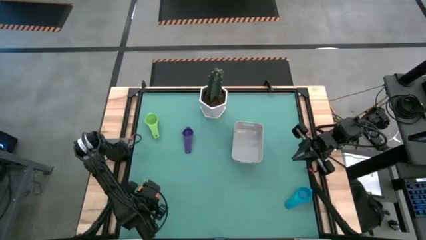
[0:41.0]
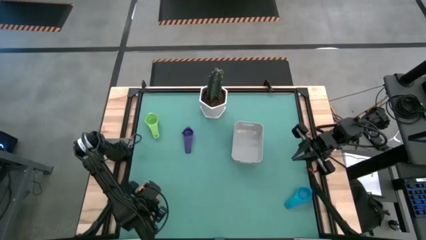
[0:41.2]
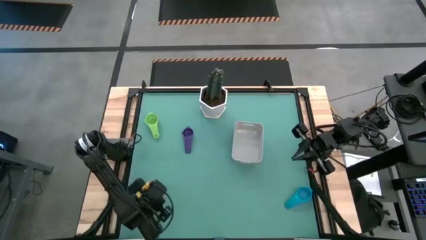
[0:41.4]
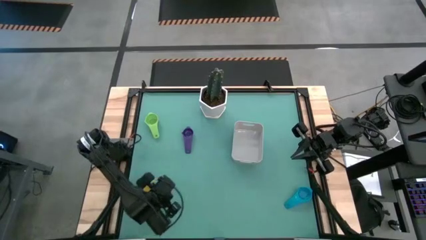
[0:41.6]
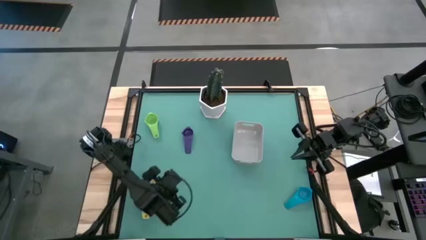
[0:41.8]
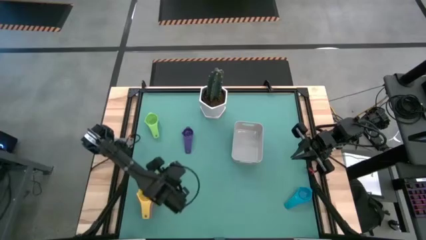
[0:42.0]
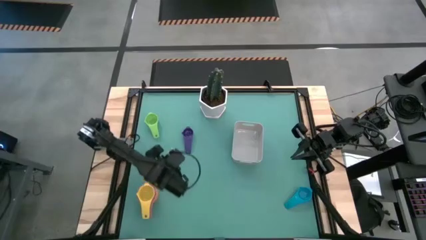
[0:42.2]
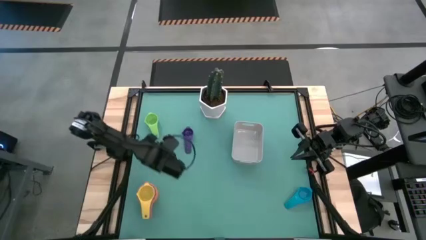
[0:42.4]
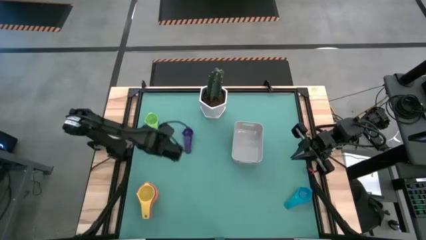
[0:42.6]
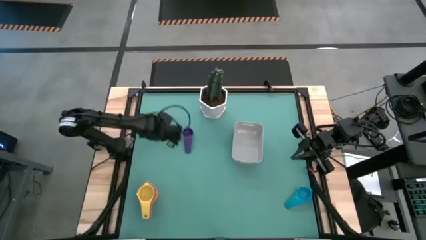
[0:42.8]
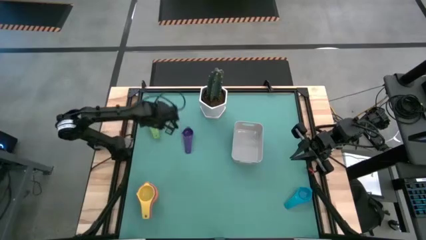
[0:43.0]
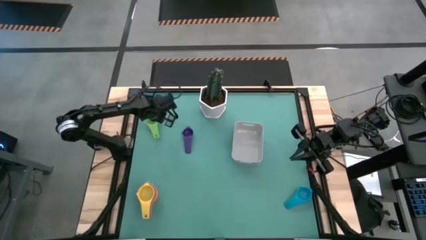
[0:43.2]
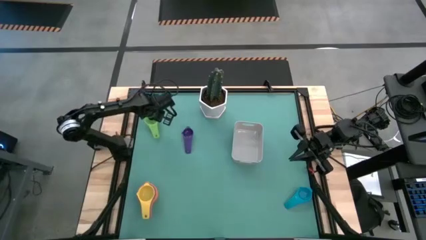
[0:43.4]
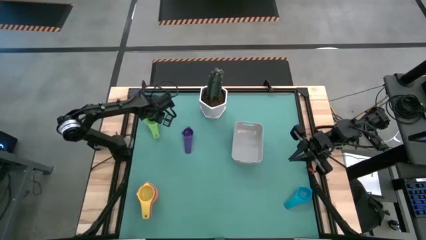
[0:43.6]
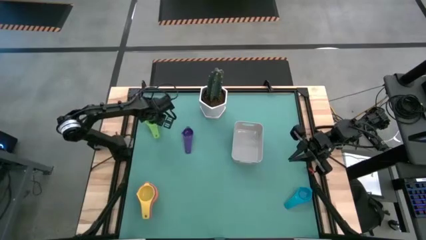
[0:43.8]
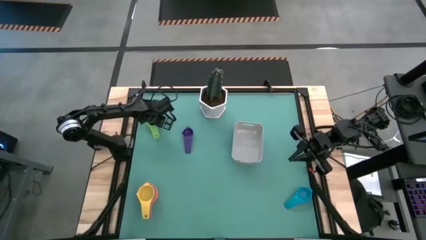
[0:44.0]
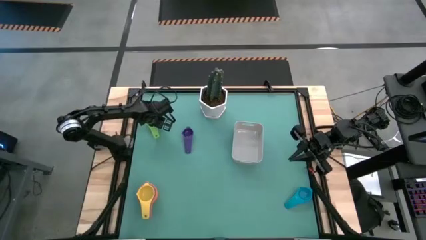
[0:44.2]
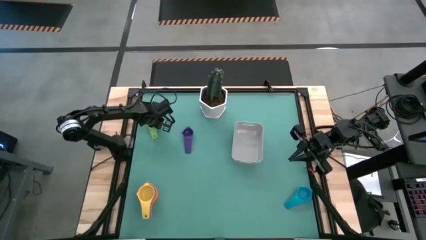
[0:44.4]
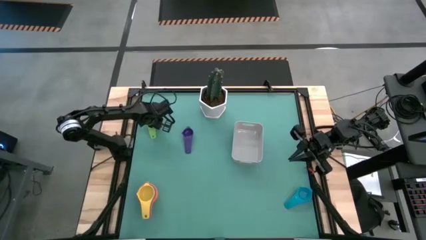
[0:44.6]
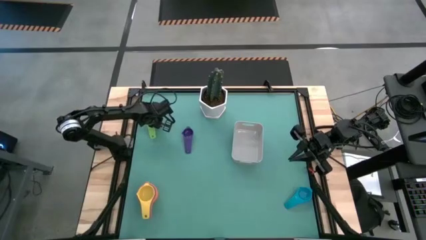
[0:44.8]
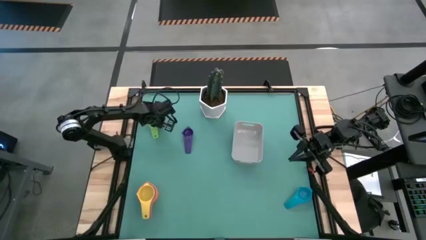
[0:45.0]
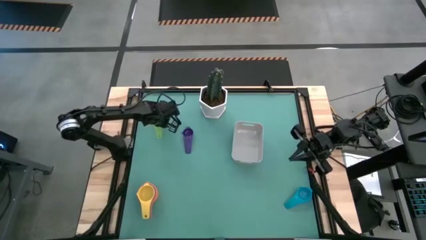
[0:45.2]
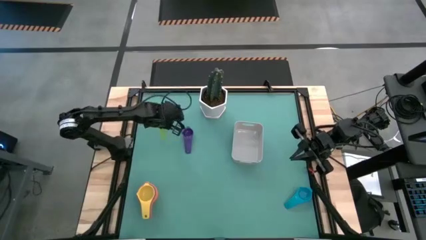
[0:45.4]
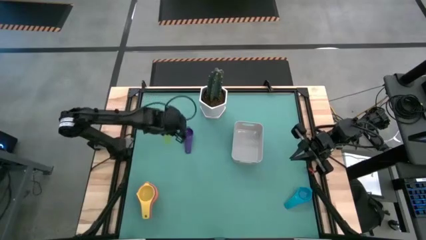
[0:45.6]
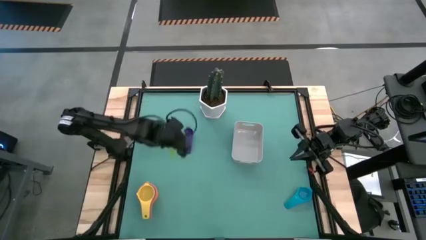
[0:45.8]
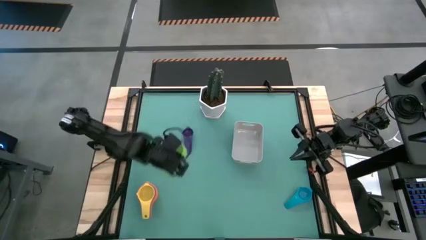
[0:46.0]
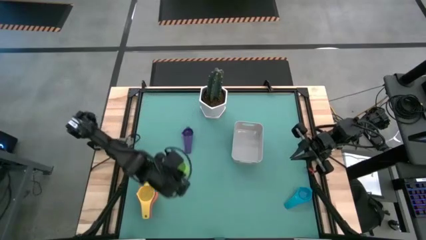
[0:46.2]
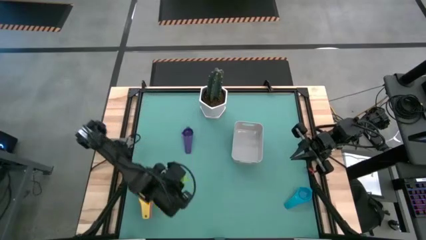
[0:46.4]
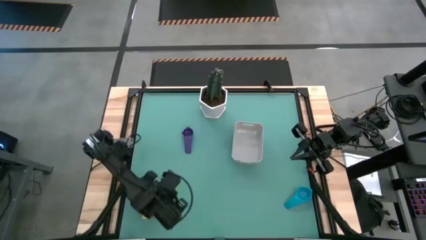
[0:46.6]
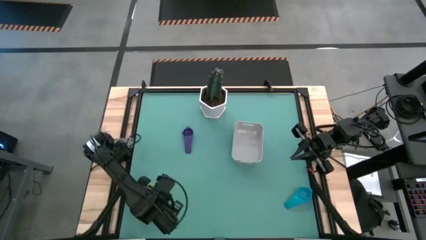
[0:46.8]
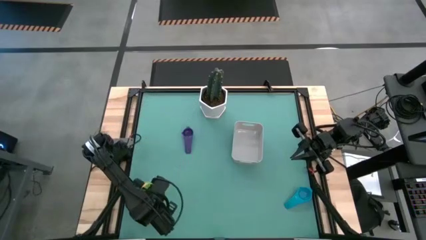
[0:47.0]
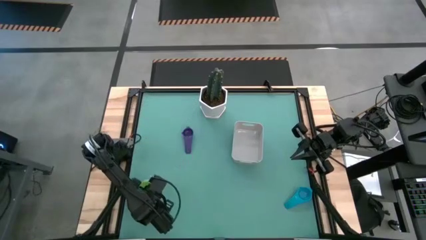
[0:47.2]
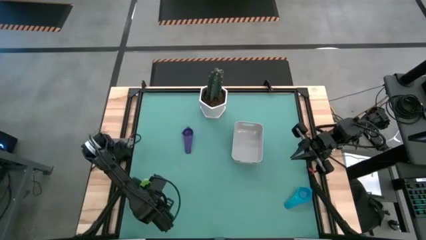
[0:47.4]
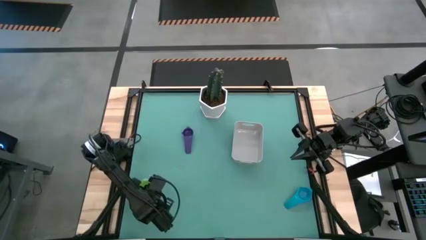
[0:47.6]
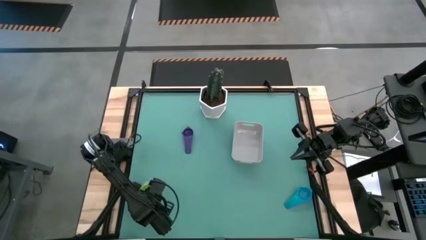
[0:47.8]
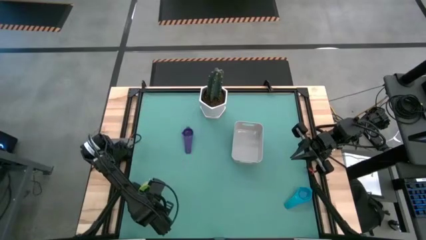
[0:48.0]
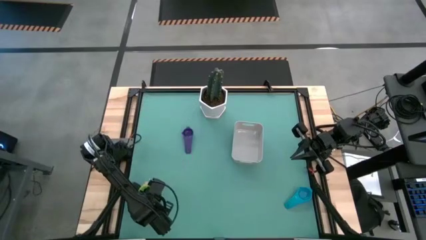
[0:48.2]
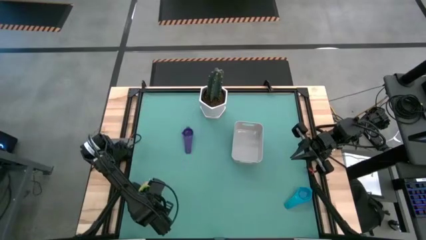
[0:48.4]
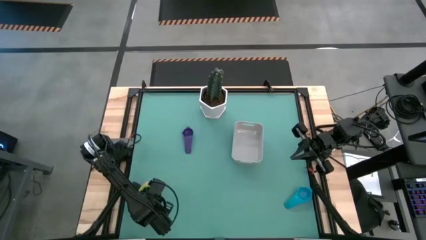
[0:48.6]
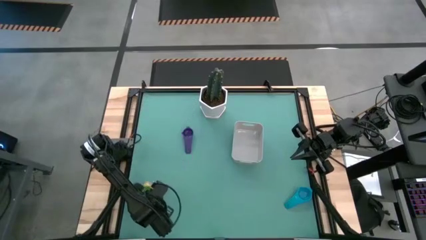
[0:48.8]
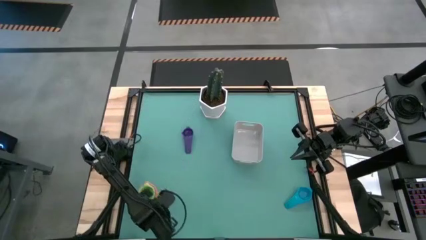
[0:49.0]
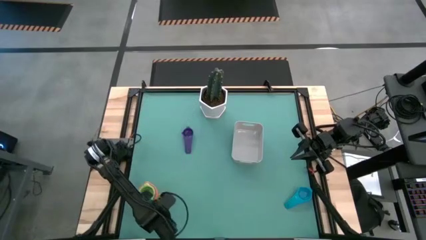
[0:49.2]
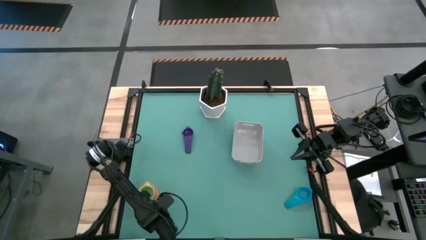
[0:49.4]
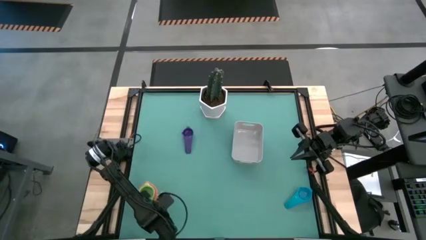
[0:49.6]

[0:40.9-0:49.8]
Task: Nest measuring cups in basket
Stack the green measuring cup on the top of the yellow measuring cup

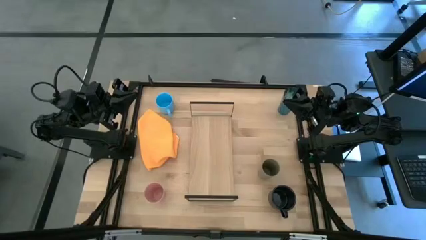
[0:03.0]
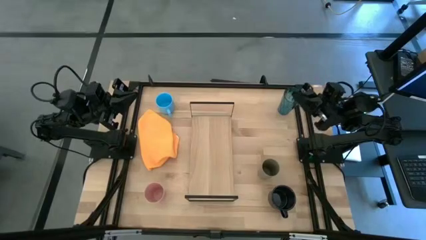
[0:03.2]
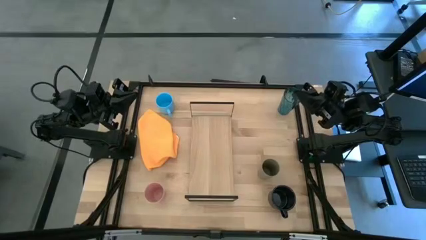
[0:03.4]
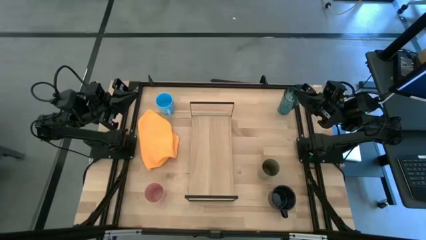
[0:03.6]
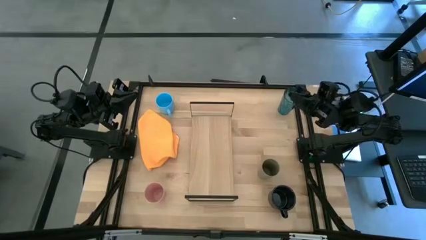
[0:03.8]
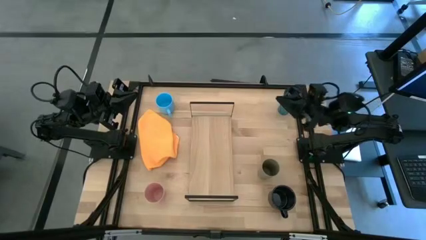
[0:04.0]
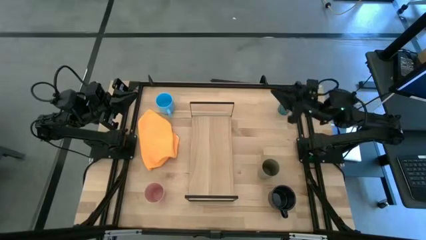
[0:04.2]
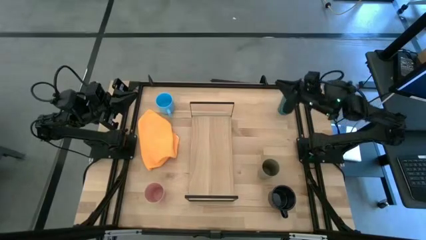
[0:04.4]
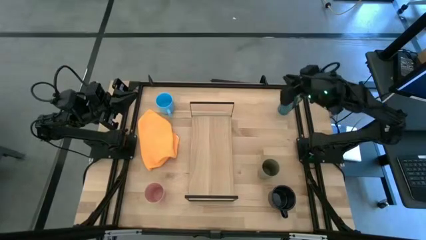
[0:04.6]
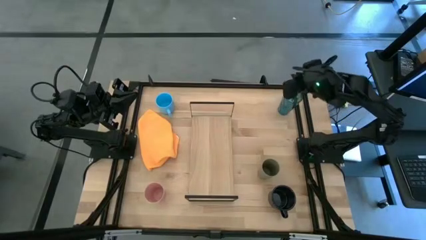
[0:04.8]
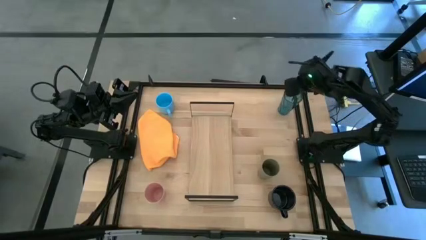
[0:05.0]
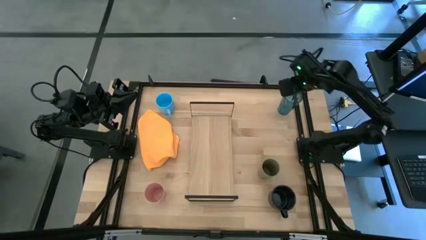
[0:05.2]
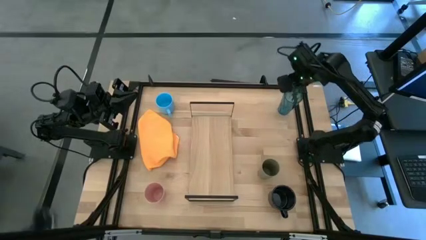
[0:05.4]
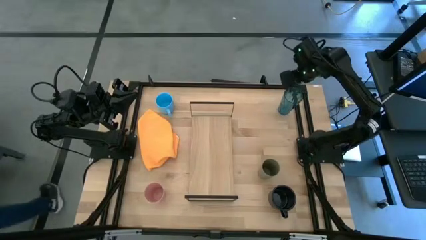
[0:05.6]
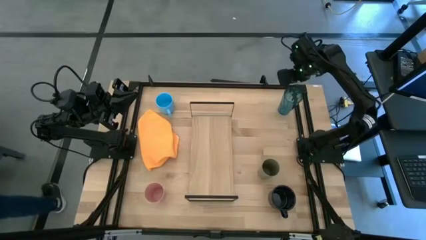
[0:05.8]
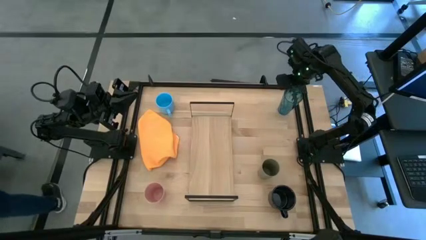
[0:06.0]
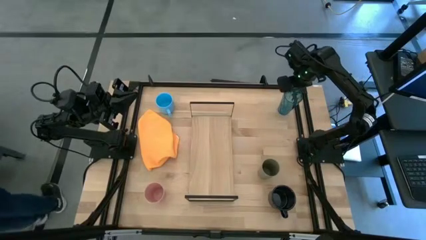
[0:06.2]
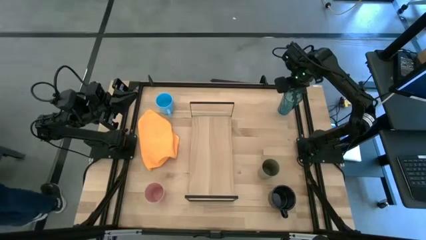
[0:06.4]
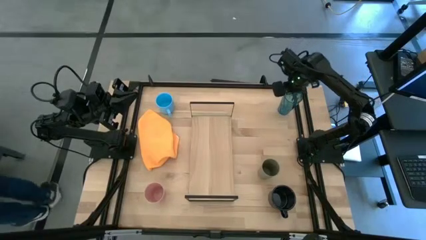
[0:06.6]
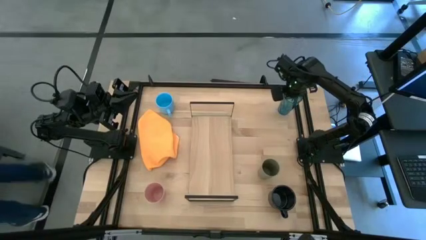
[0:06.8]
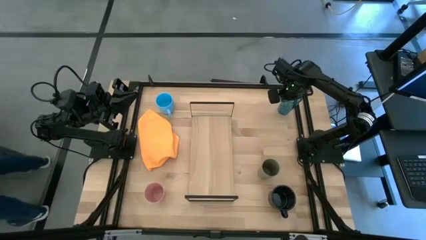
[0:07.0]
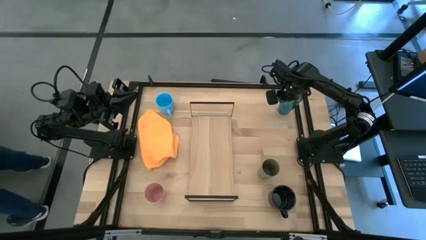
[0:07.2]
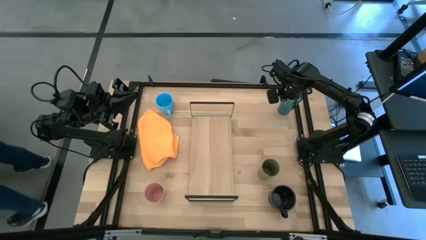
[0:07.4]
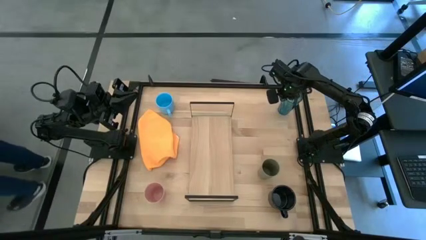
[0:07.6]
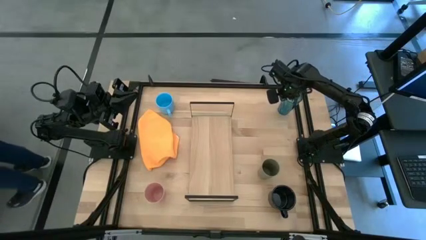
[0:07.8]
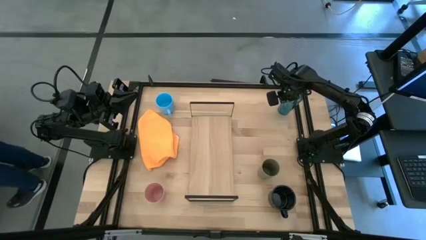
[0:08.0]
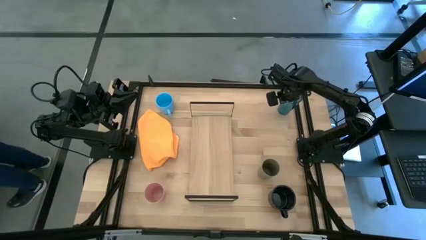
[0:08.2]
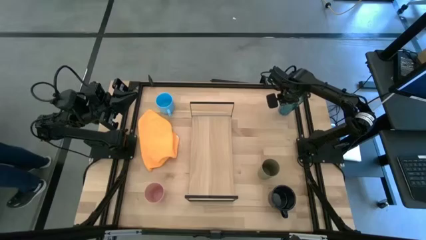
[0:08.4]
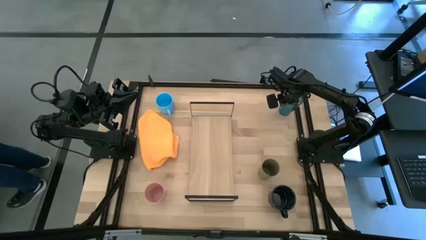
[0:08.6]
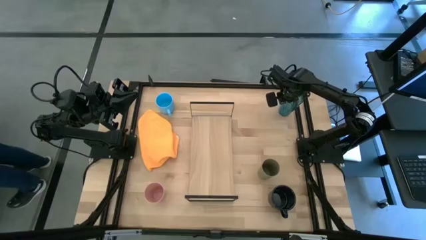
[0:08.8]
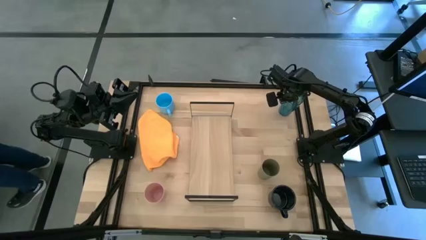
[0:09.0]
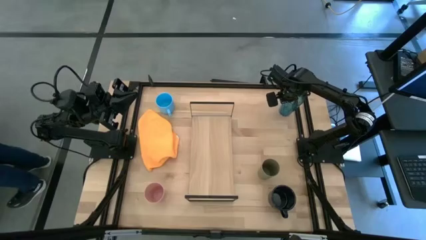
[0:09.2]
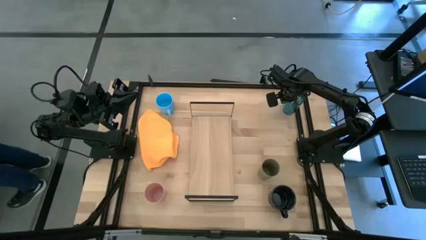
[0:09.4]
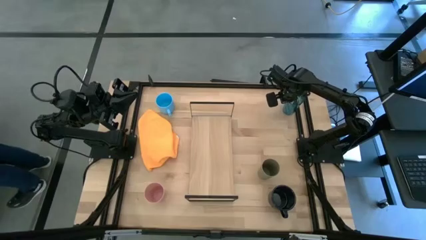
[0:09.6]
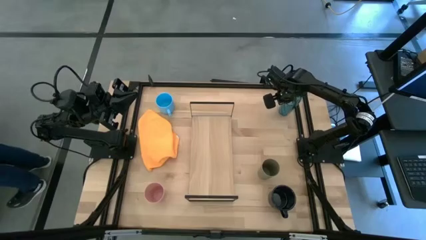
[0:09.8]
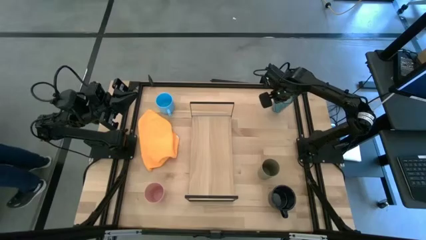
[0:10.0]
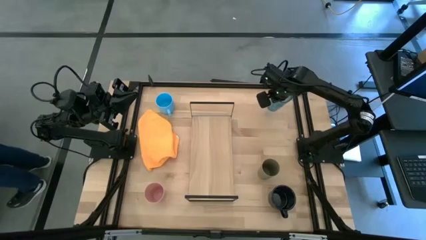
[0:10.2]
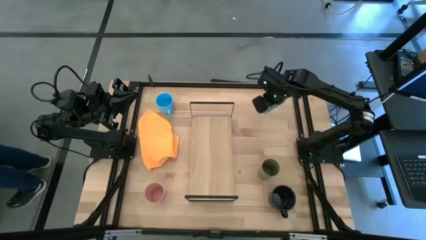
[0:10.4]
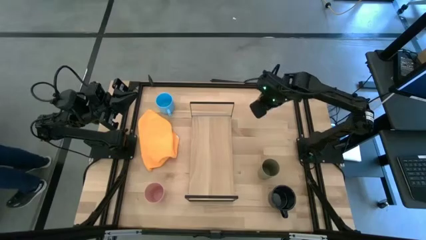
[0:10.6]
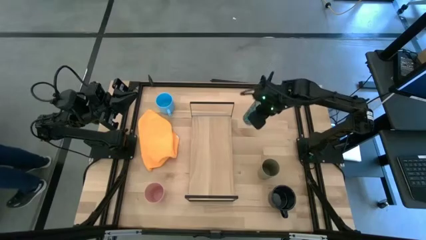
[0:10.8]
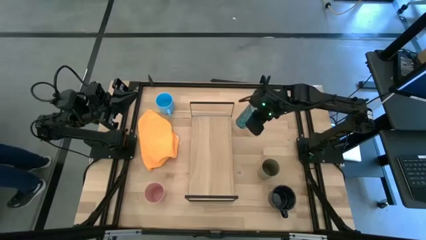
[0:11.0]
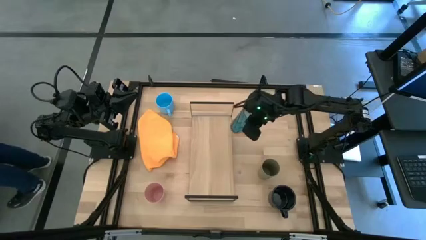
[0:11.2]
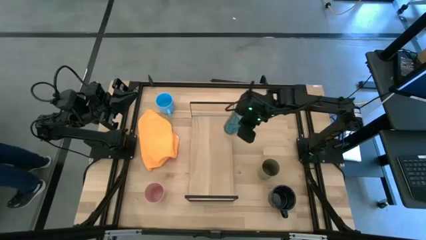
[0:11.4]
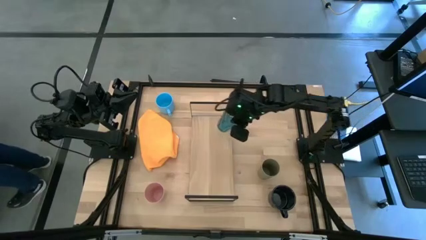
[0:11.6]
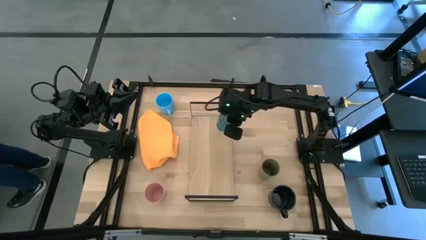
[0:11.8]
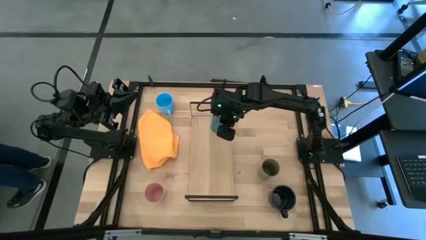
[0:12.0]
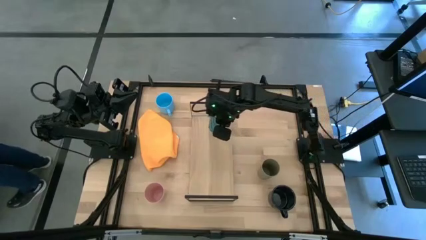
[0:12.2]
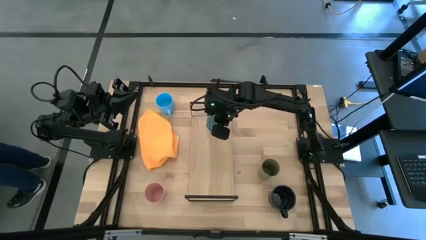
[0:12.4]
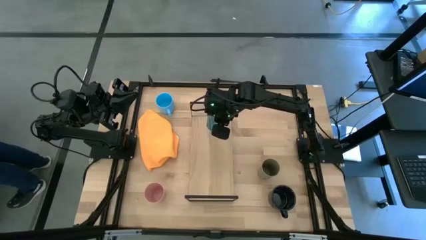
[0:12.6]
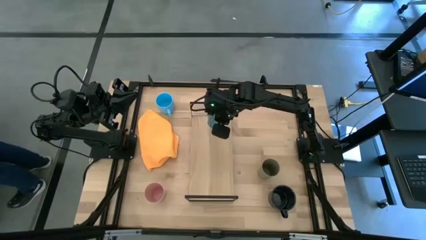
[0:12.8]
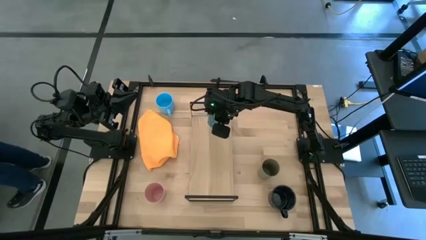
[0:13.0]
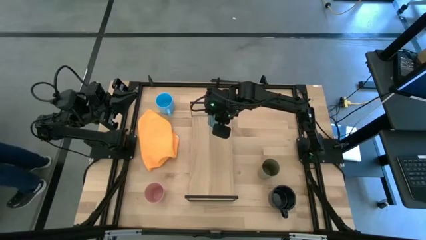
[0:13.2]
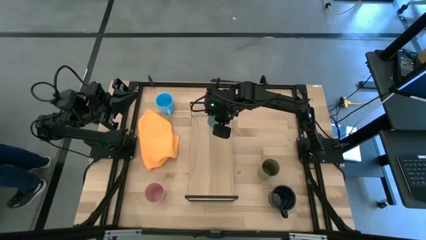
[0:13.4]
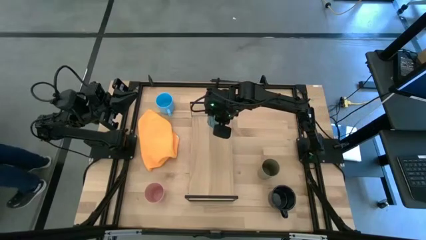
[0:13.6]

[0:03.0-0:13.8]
Task: Stack small to large cups/mugs on shelf
Put the blue cup on the shelf
